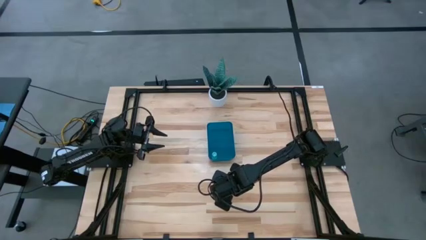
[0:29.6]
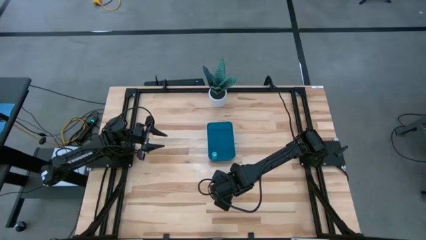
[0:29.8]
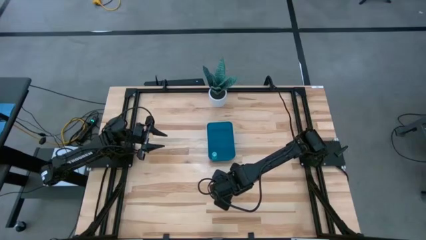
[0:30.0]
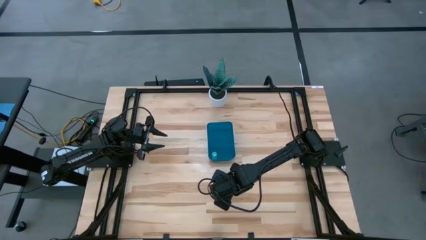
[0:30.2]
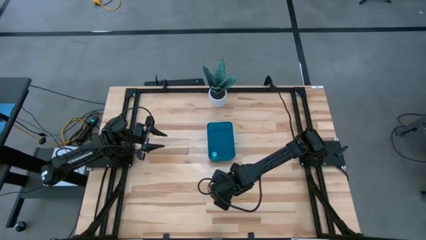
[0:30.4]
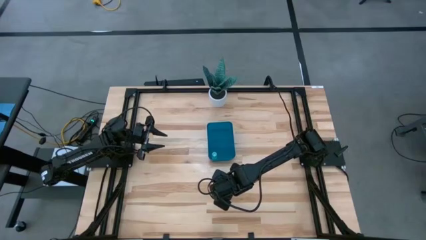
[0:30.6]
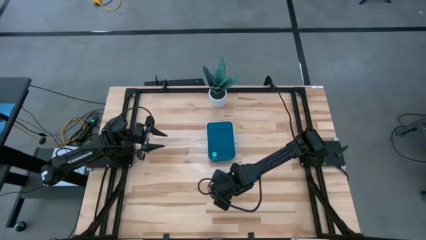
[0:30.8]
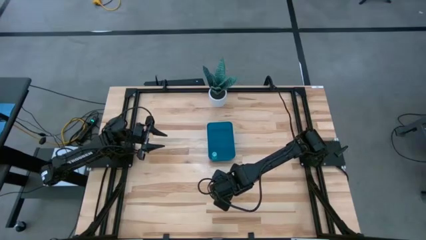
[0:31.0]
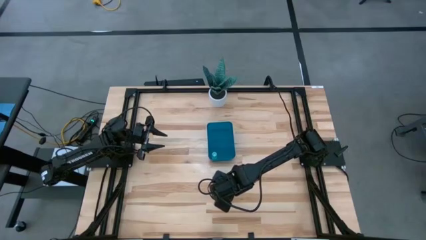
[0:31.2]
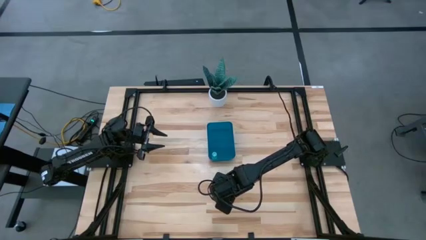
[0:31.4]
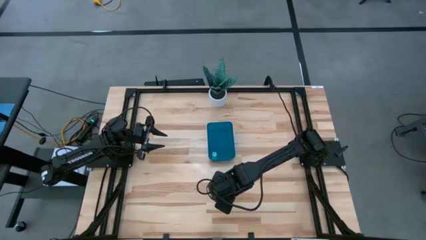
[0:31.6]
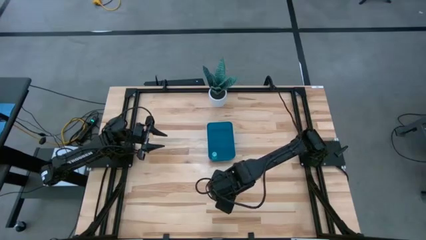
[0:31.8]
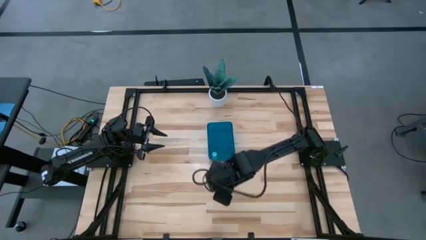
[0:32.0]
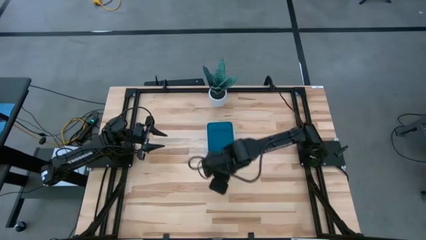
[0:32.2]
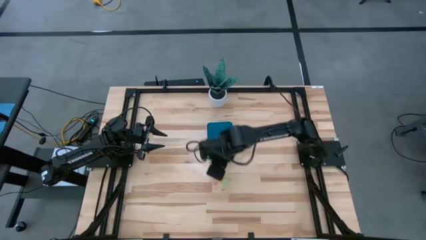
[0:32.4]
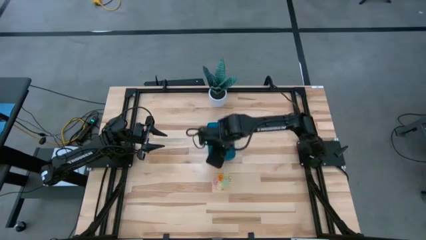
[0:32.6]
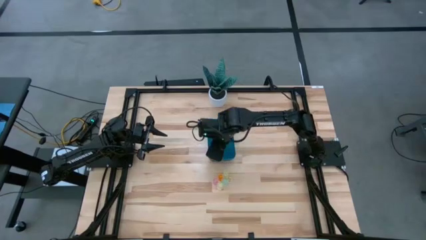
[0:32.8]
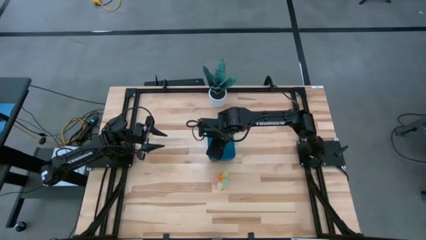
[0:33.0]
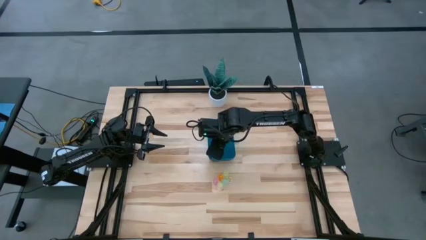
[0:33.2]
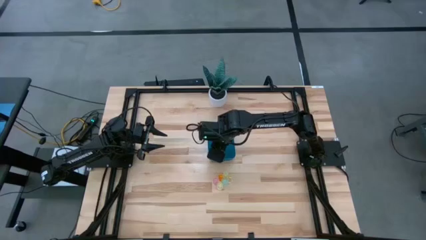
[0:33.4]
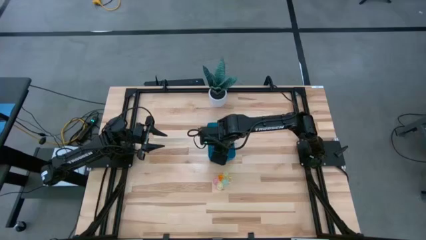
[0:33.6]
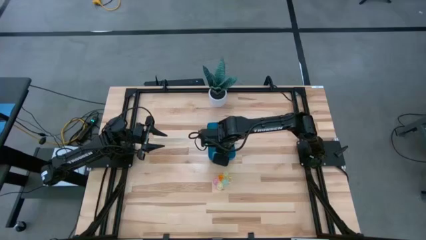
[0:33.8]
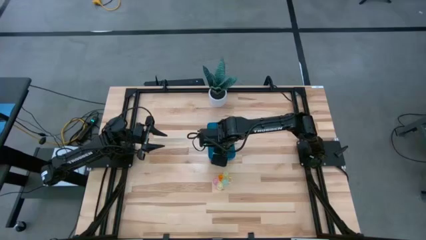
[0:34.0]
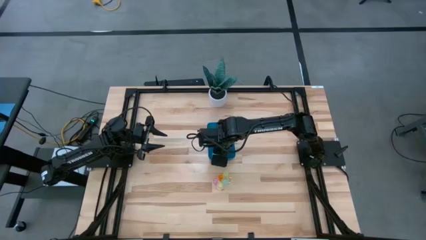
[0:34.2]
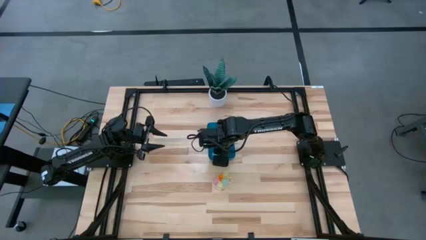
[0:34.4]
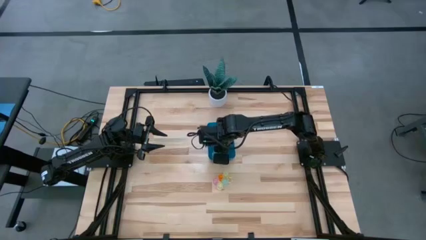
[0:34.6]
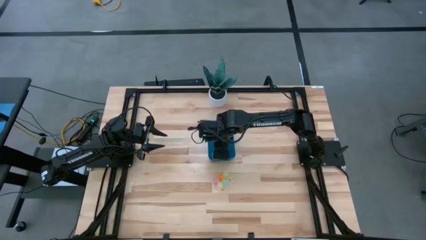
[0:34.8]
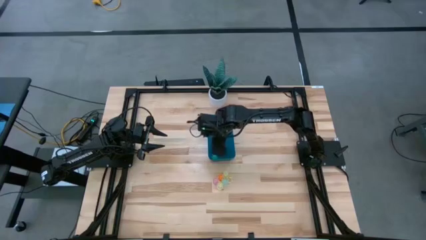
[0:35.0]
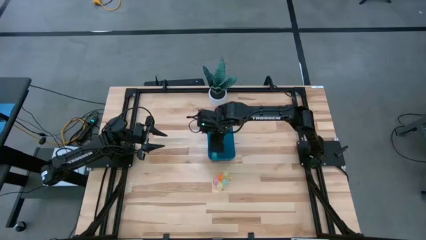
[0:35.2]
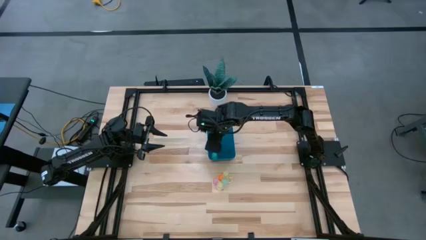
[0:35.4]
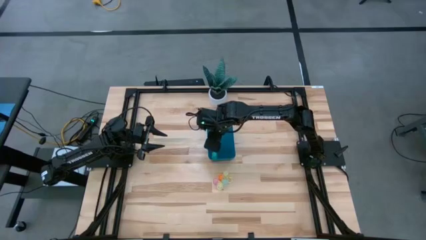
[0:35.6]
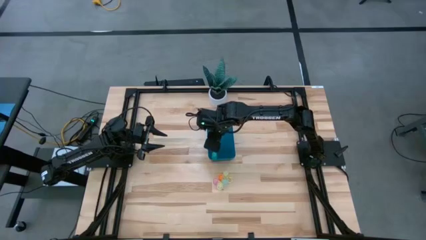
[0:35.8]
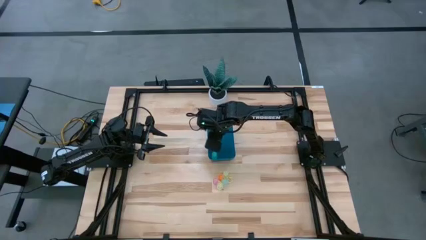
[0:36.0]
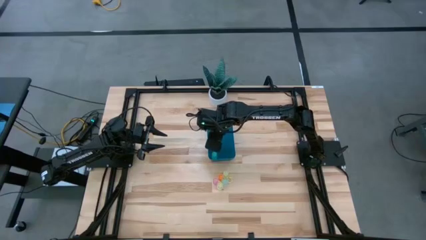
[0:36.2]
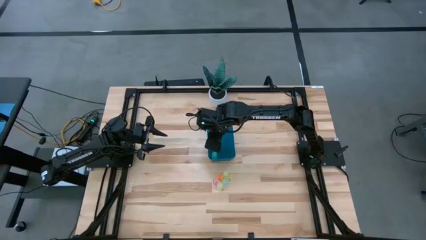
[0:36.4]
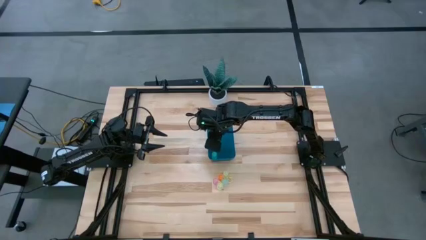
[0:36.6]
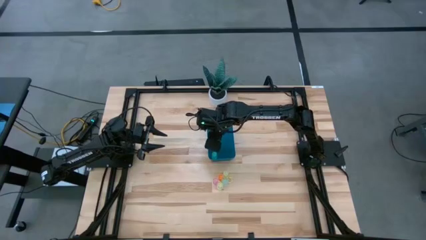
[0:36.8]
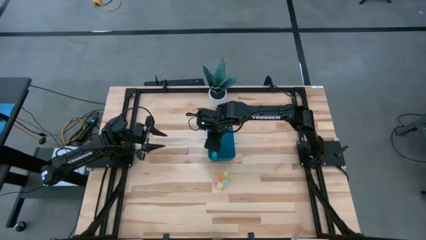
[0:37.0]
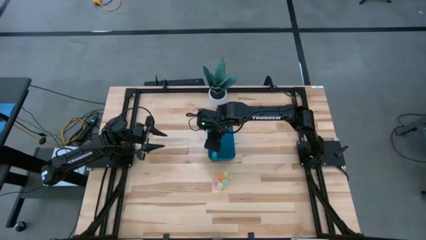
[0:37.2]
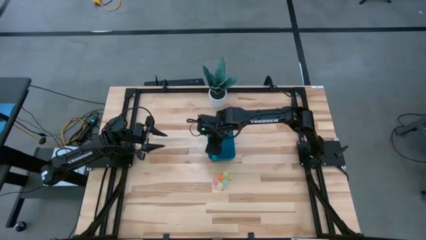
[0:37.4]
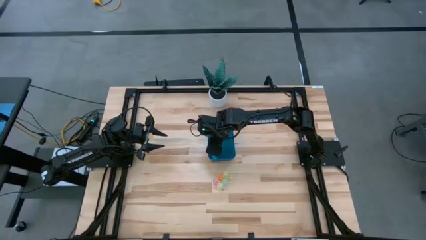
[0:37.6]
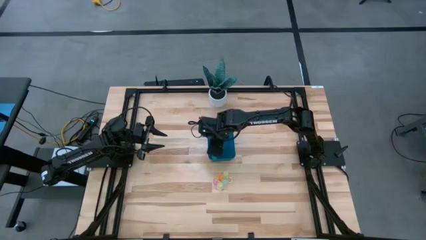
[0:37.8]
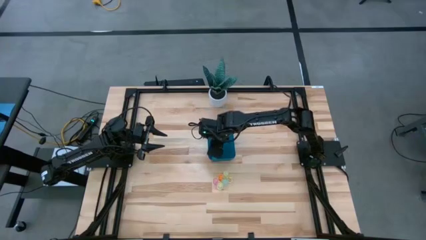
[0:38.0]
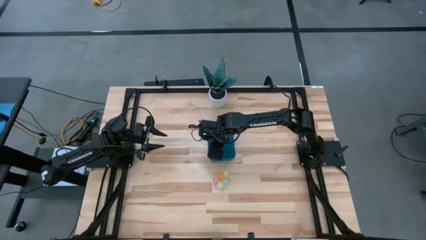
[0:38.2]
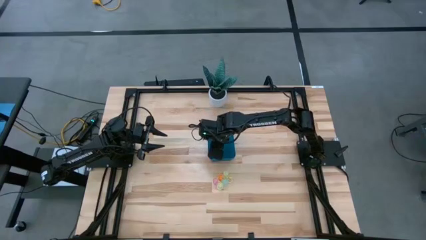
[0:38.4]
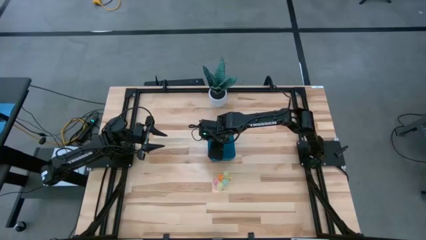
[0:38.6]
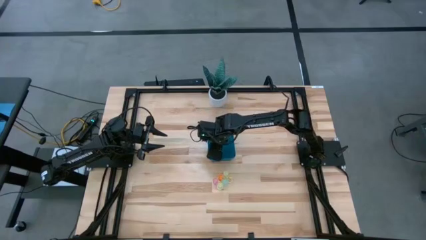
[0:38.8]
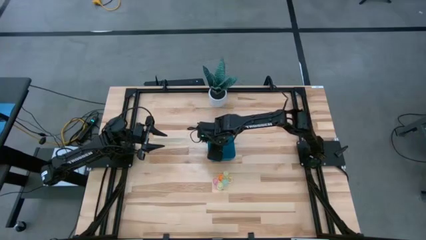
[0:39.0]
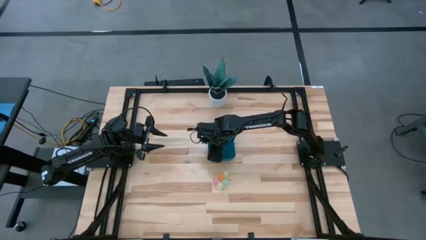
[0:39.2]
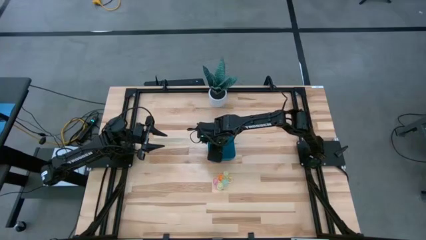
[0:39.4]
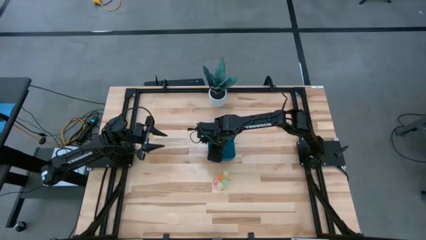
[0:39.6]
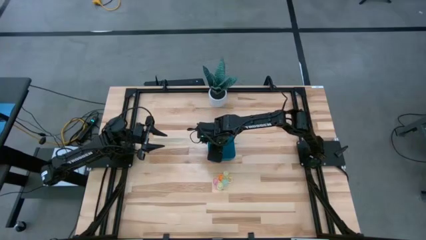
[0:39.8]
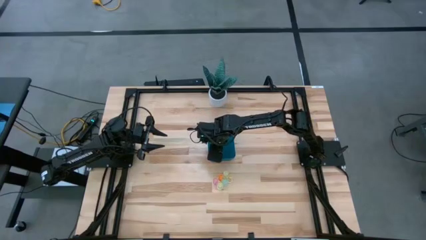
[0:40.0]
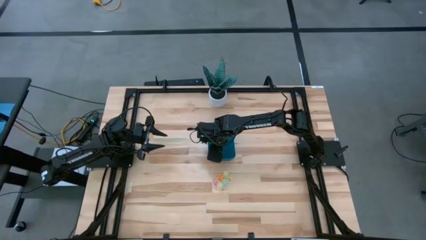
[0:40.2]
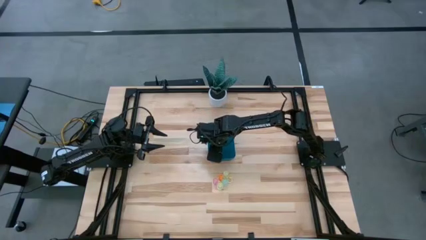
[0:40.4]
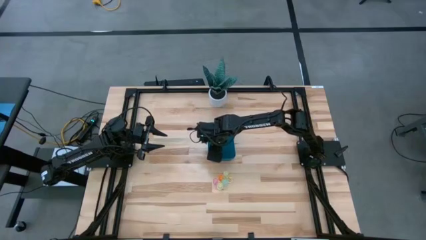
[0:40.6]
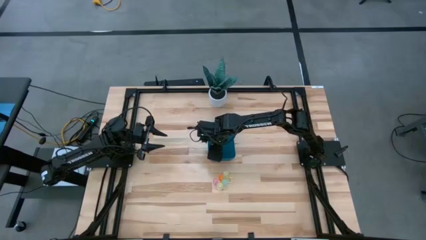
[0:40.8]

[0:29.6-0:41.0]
Task: Pick and place pill bottles into a basket
Put the yellow pill bottle into the blue container
